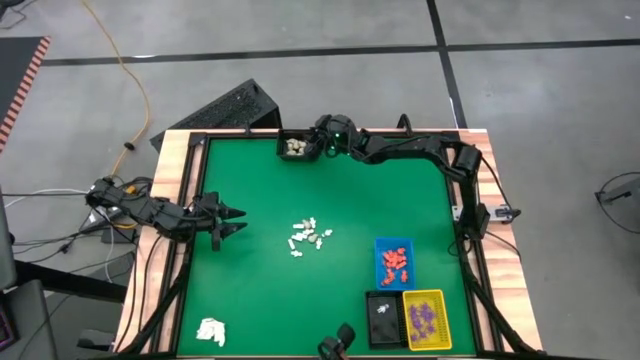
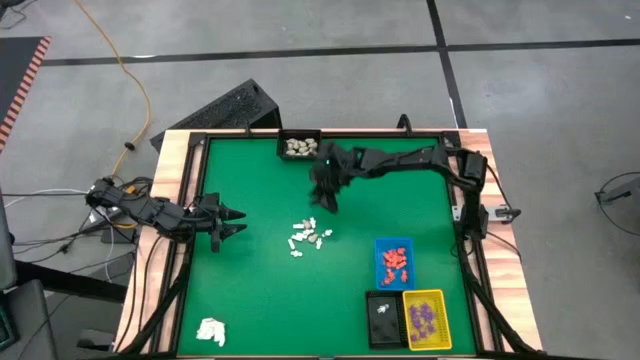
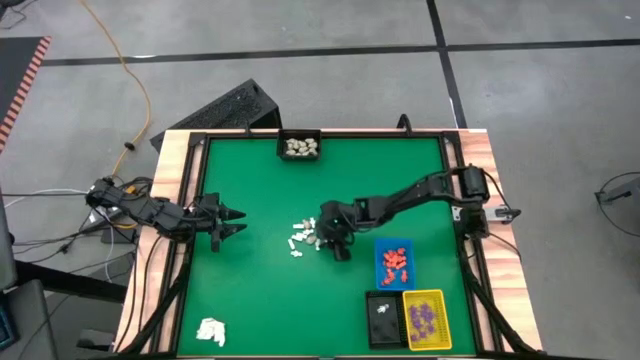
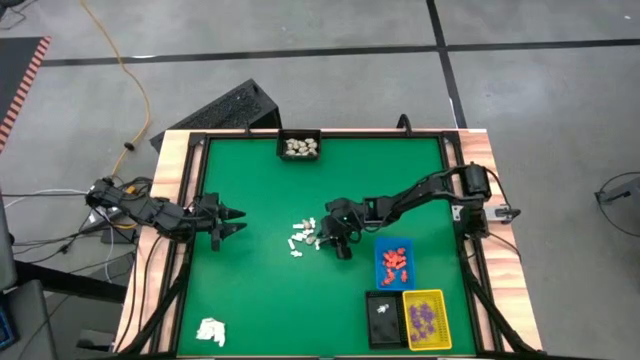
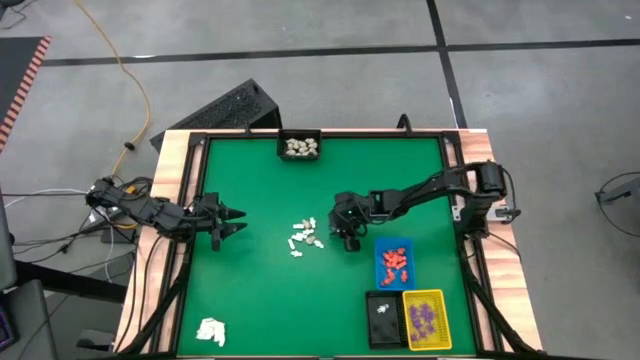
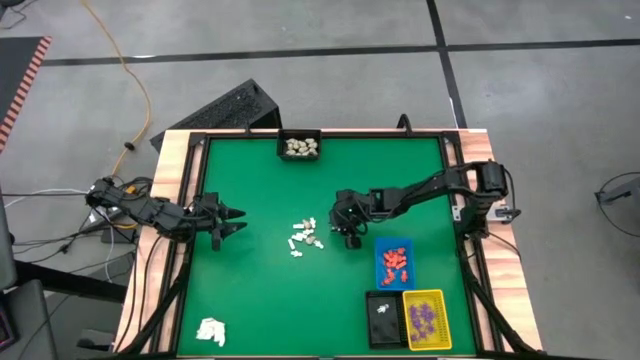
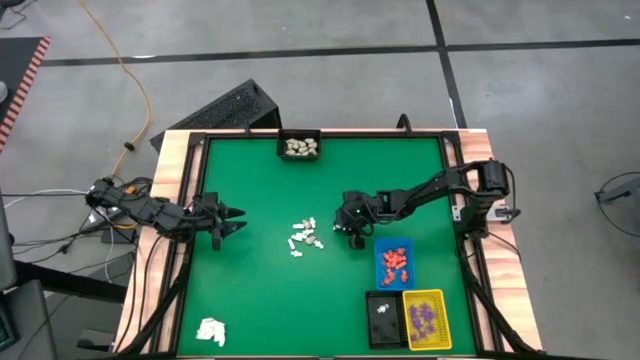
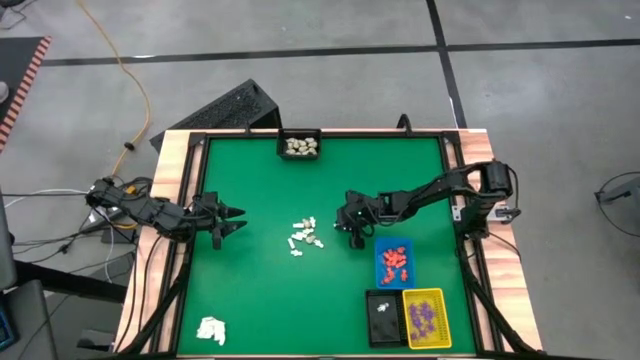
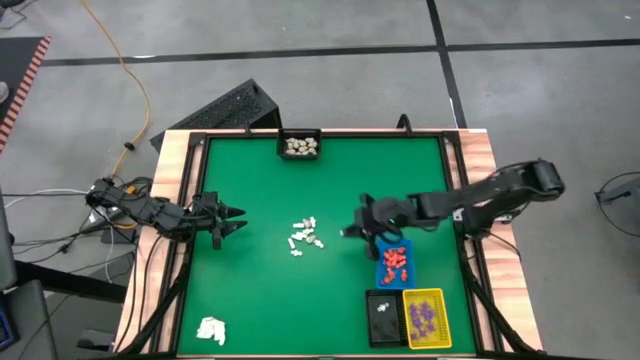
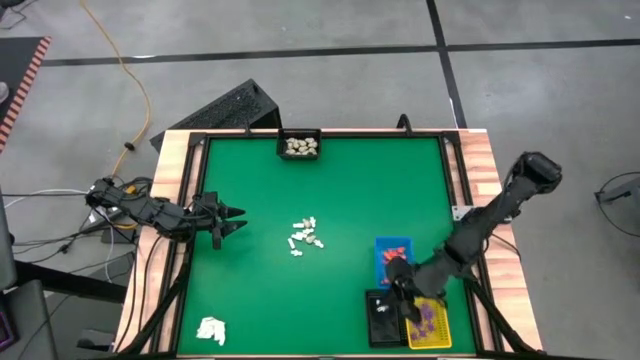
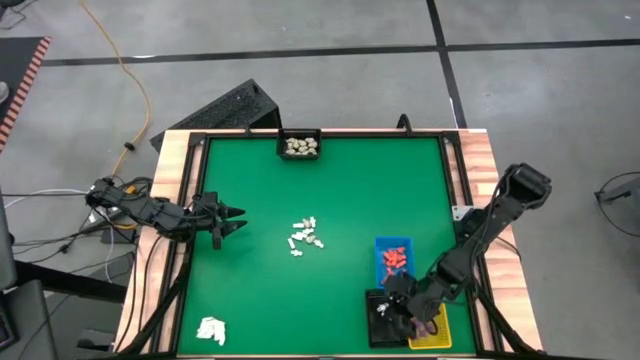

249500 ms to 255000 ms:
Task: Sort Halloween decoration
Put the white skeleton toy into the bottom black bin

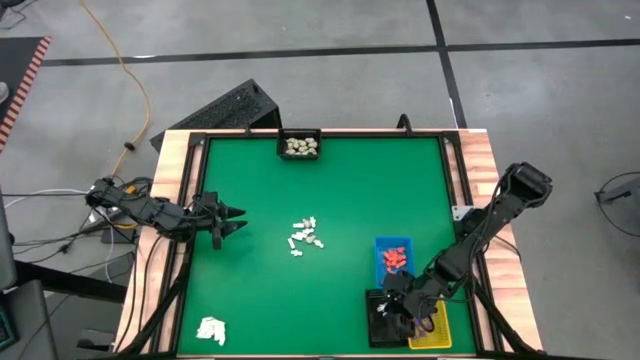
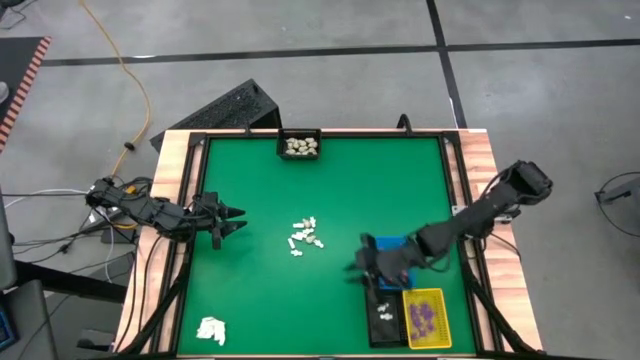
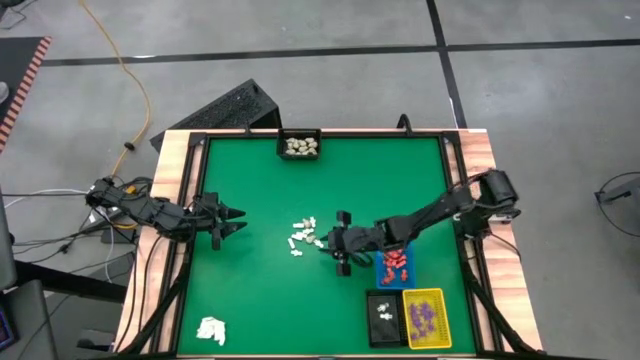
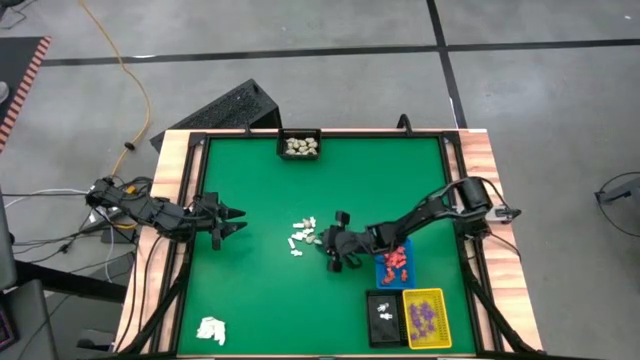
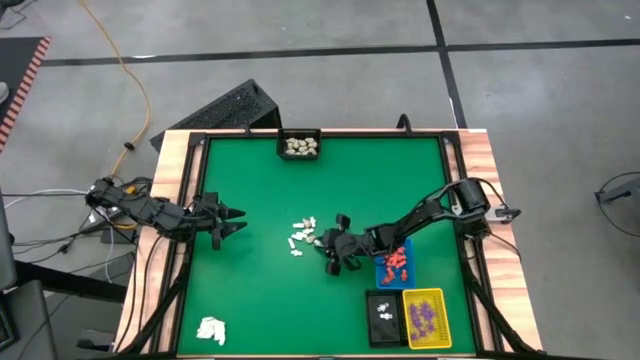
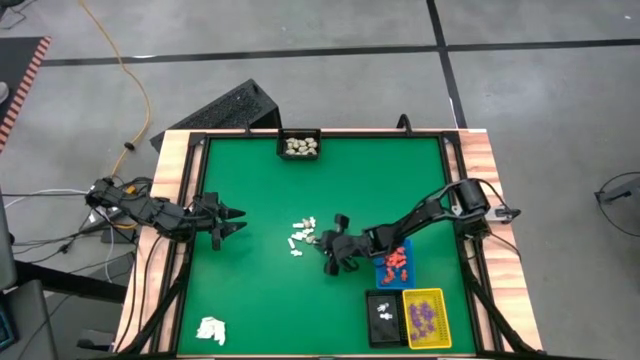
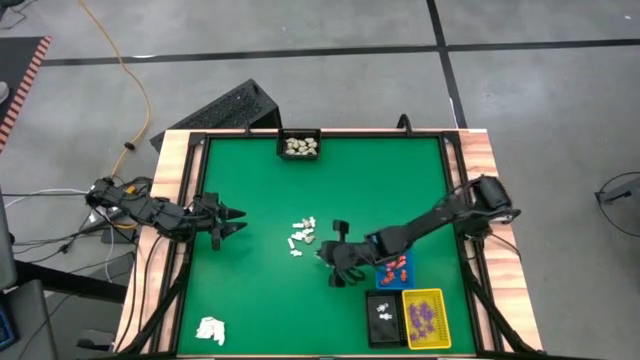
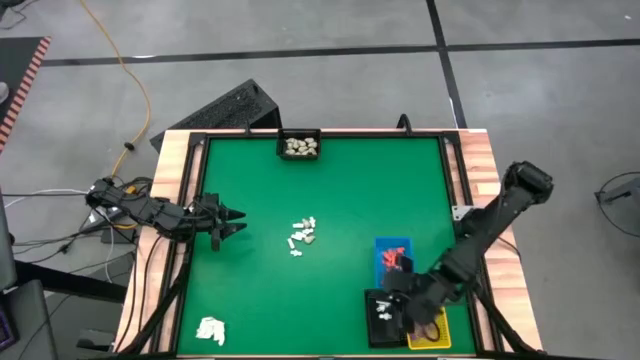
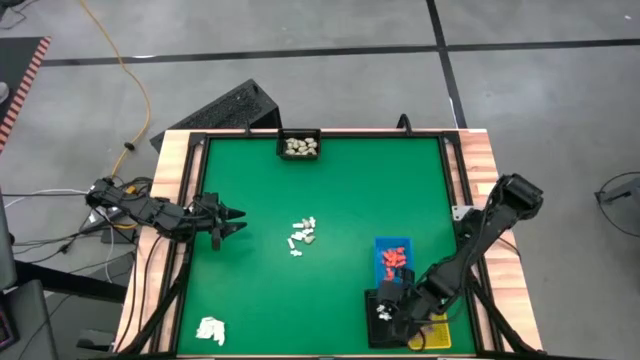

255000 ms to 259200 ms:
Put the white skeleton toy into the bottom black bin

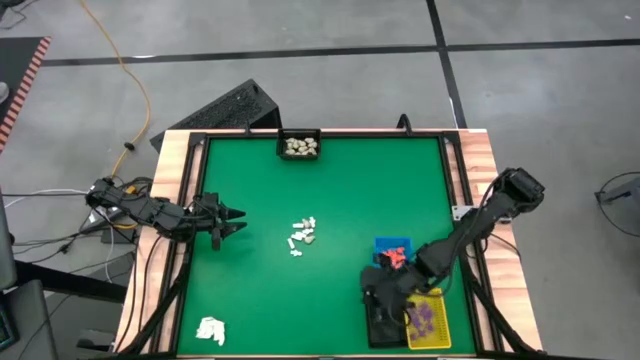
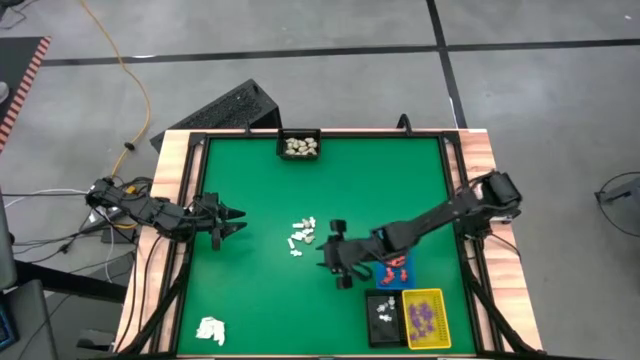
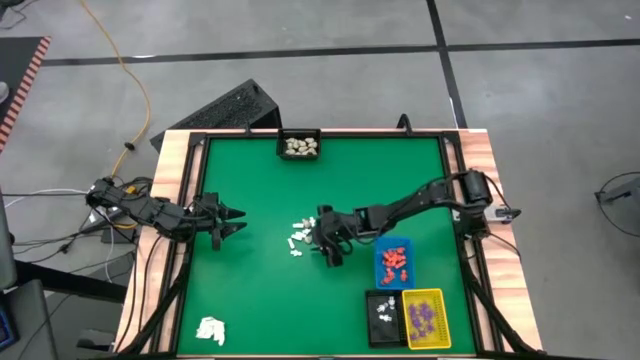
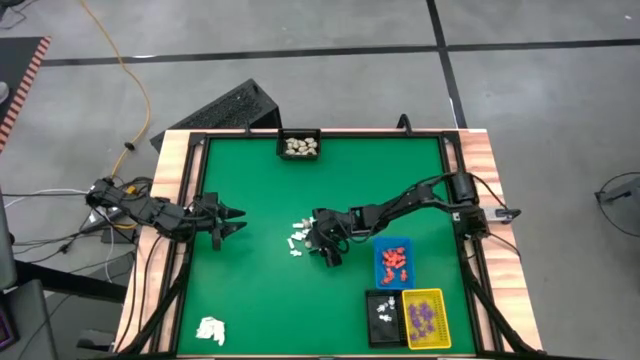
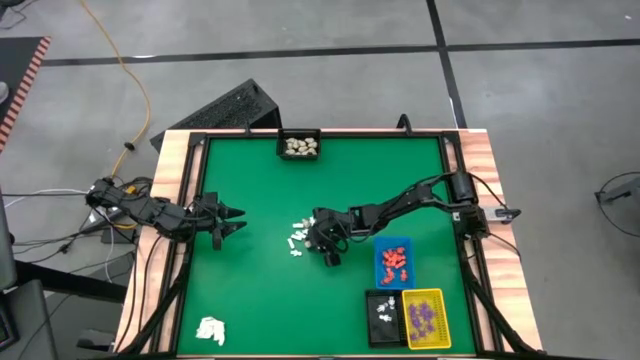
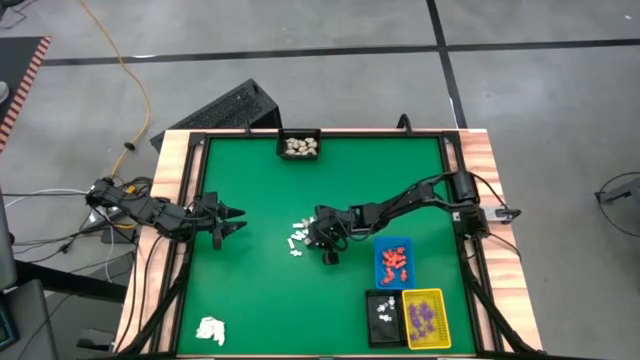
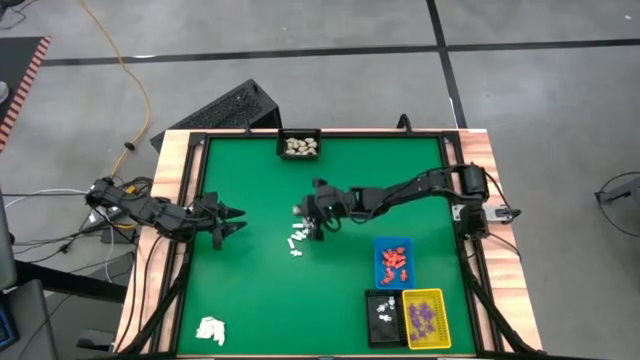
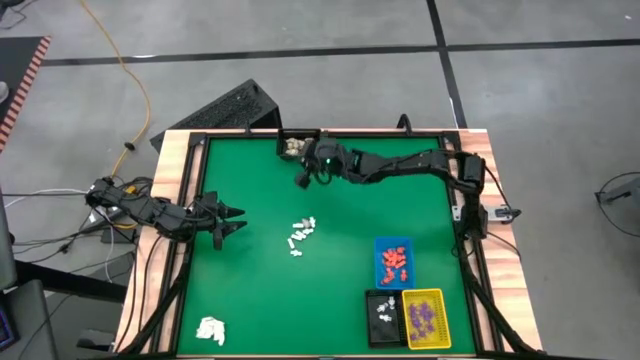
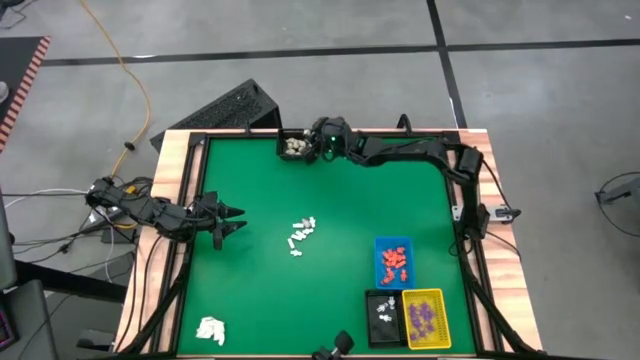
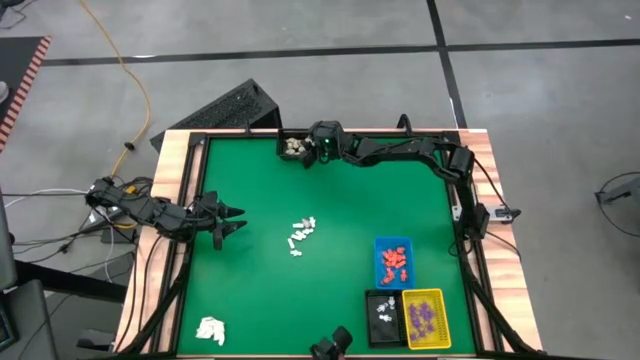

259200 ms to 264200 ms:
Put the gray skull toy into the top black bin

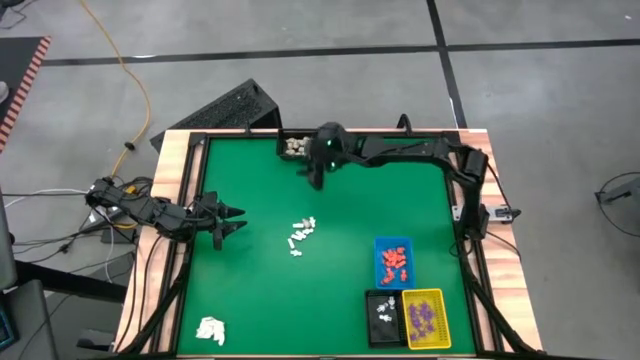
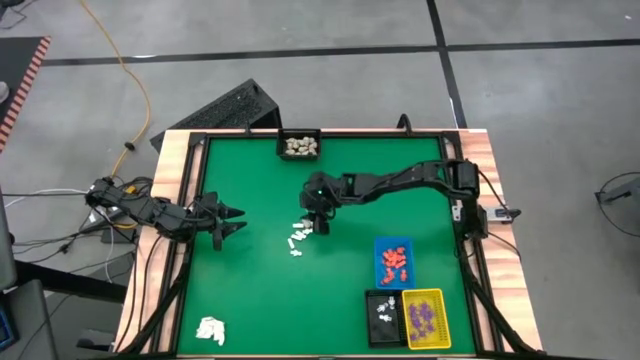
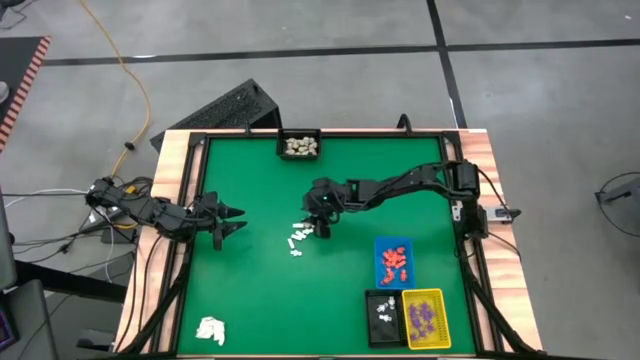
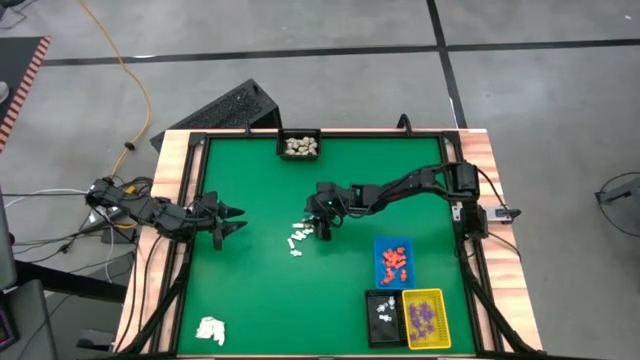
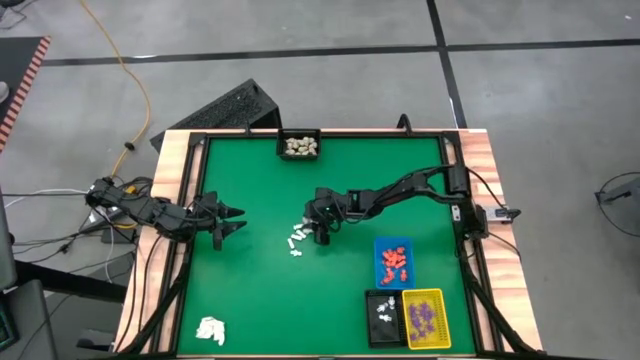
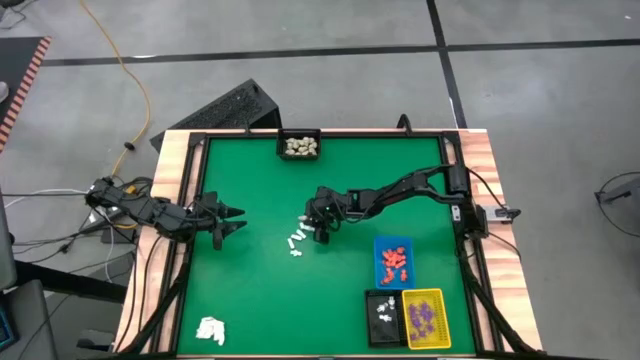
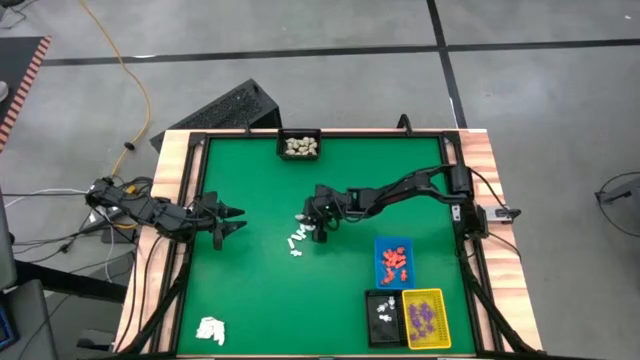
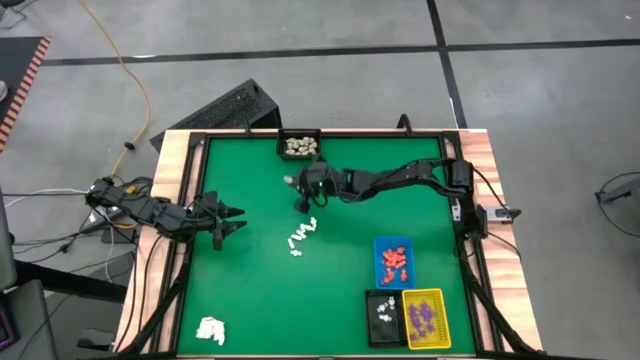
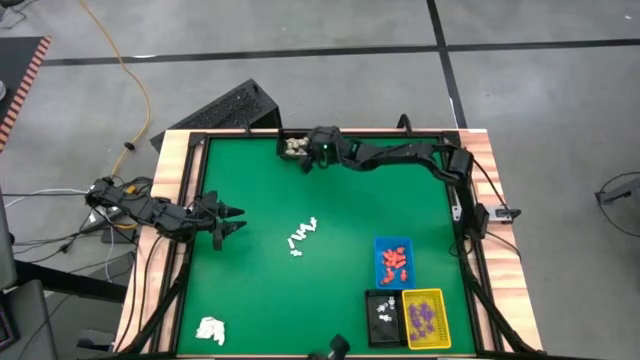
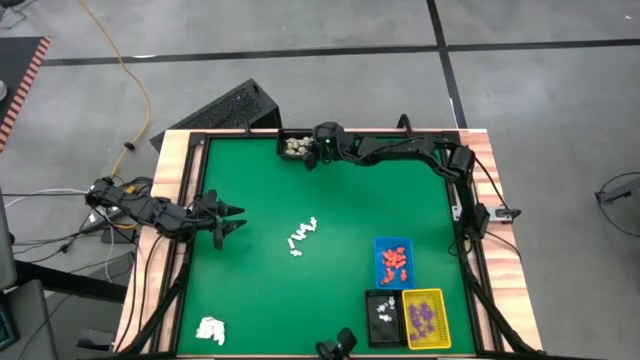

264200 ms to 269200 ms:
Put the gray skull toy into the top black bin

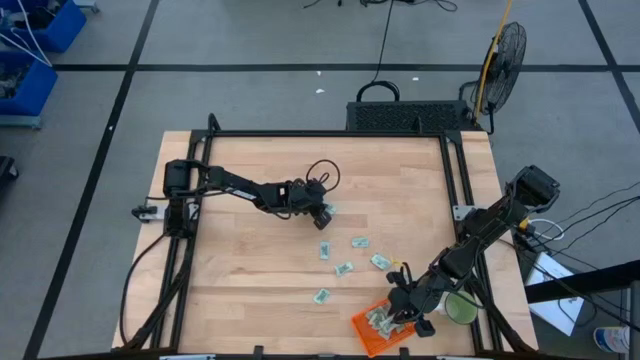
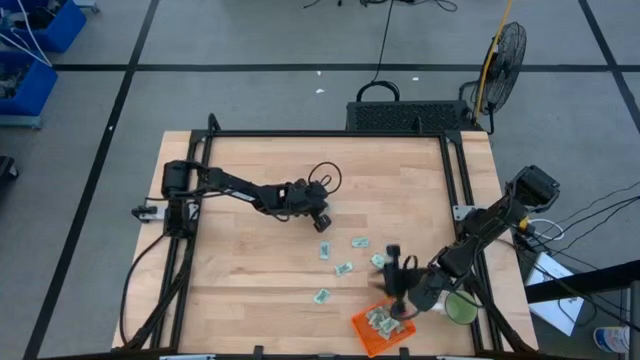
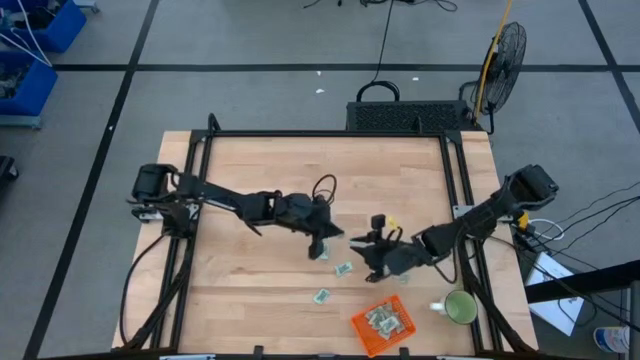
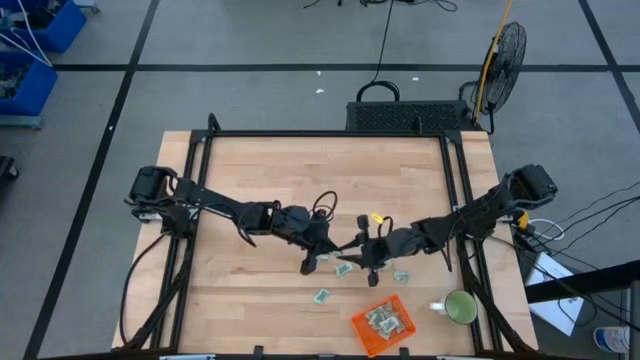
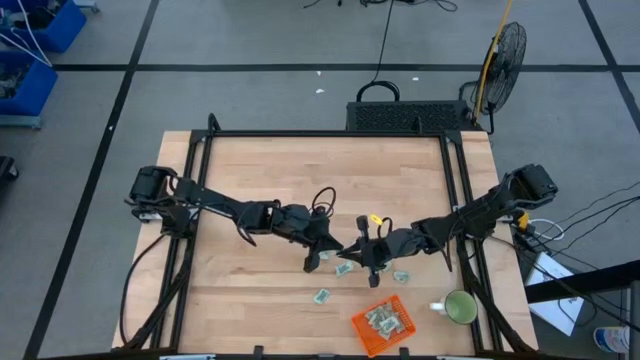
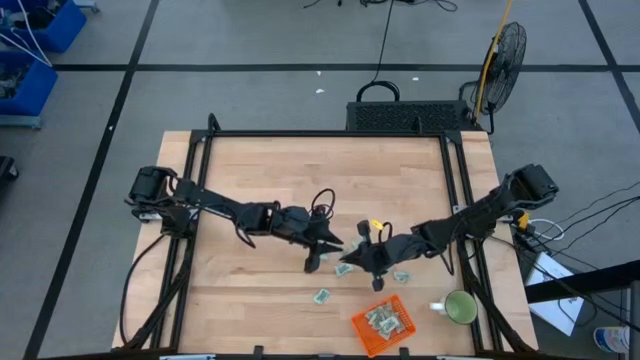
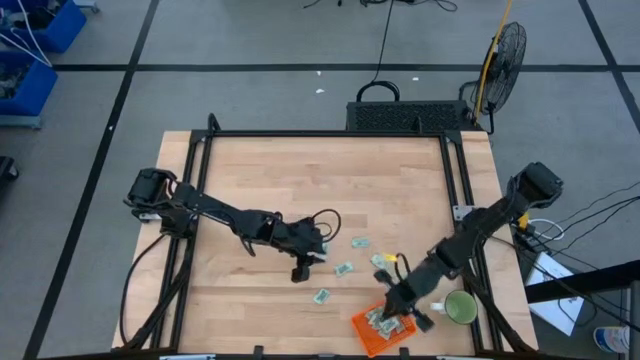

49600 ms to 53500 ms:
Task: Pick and place Stevia / Truvia into bins
Put the stevia packet into the orange bin
